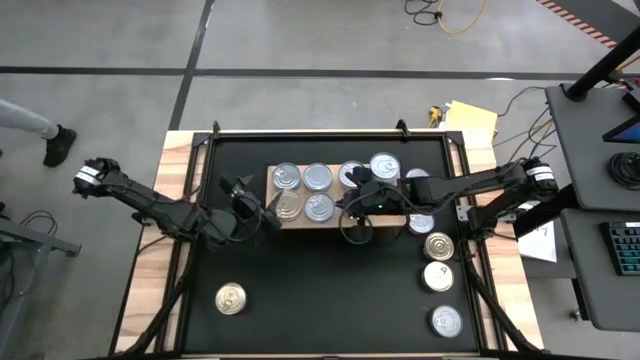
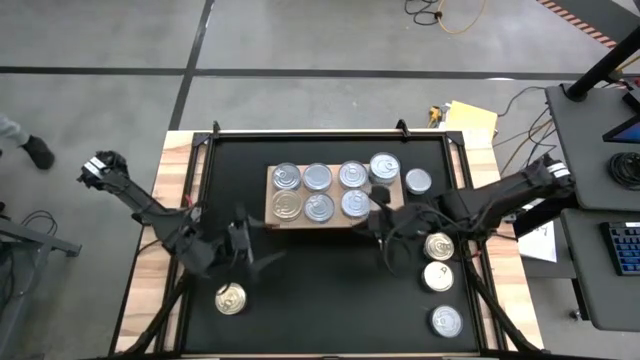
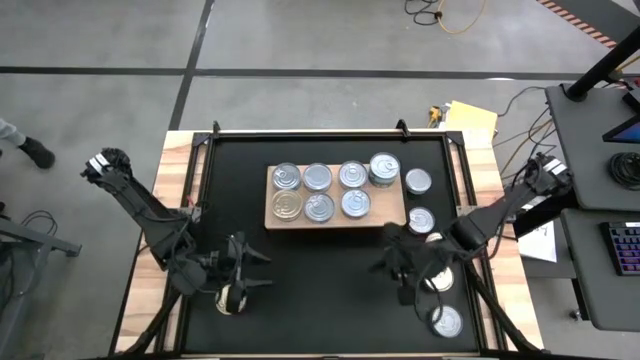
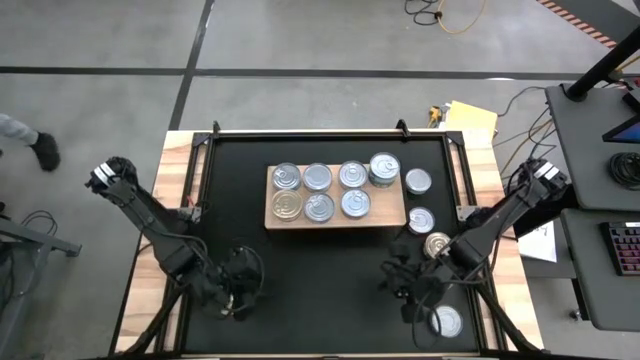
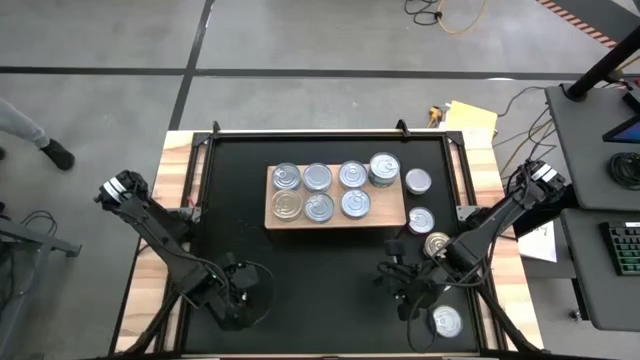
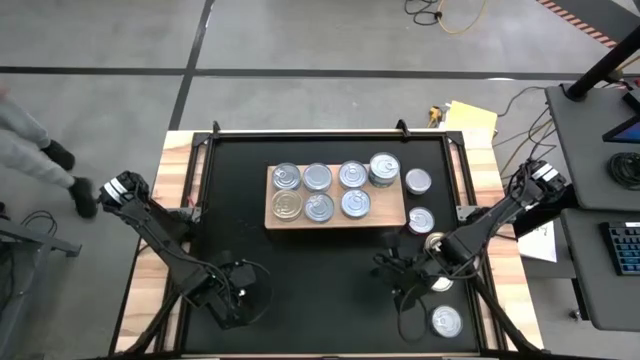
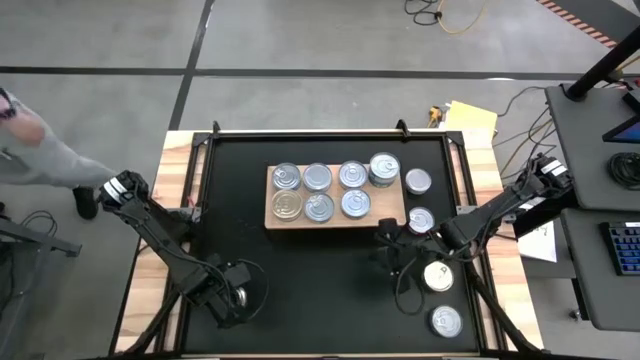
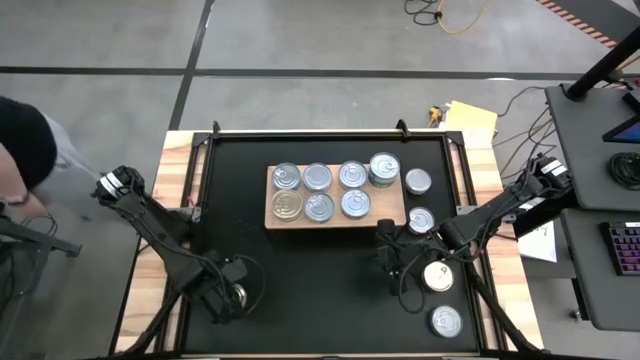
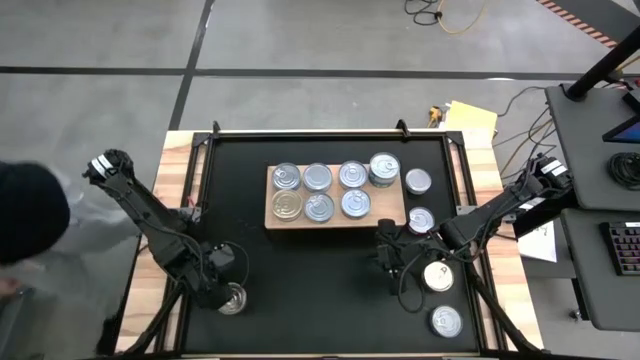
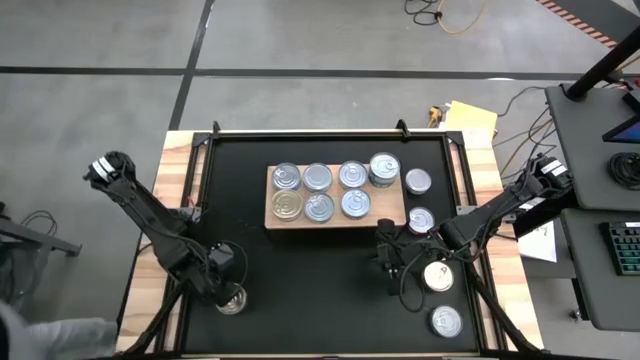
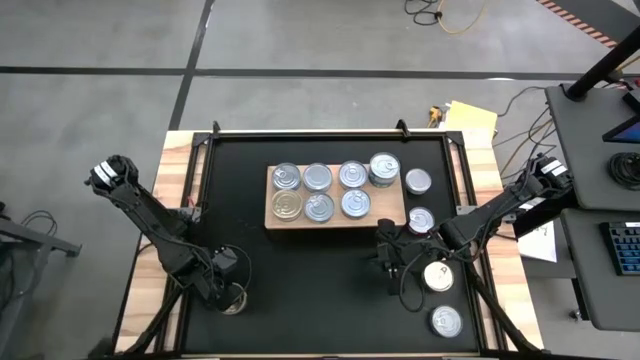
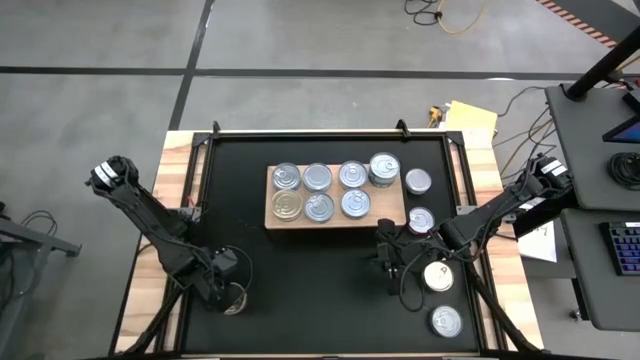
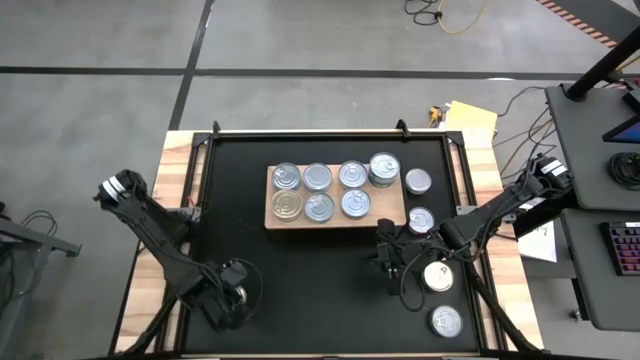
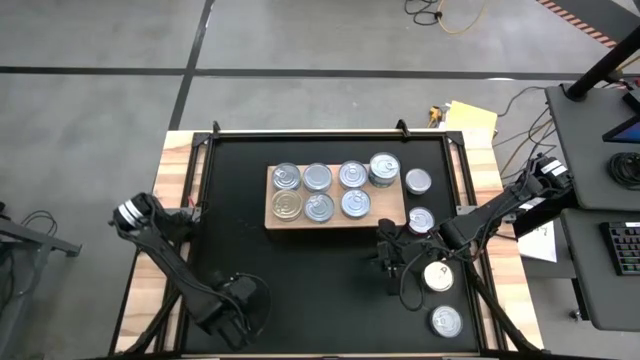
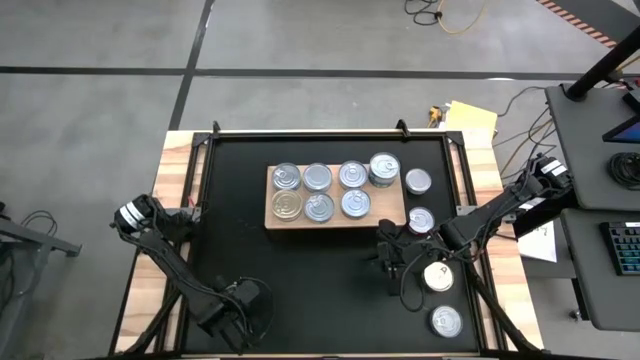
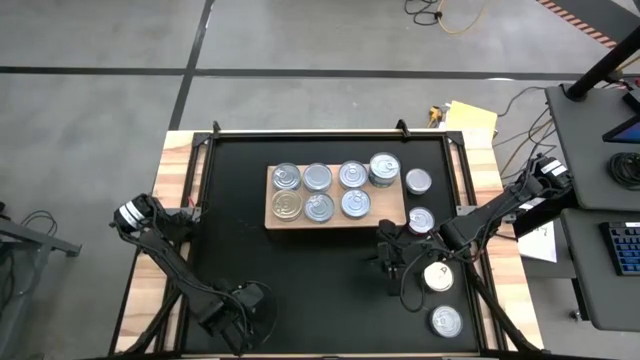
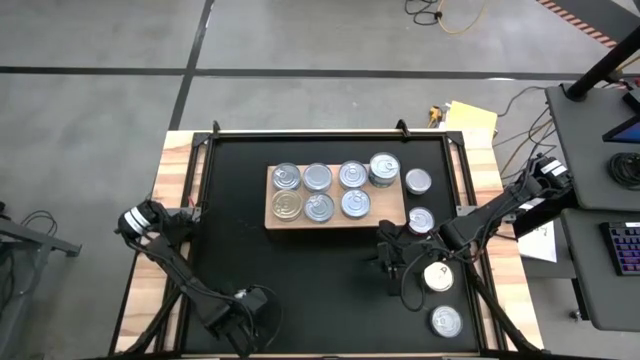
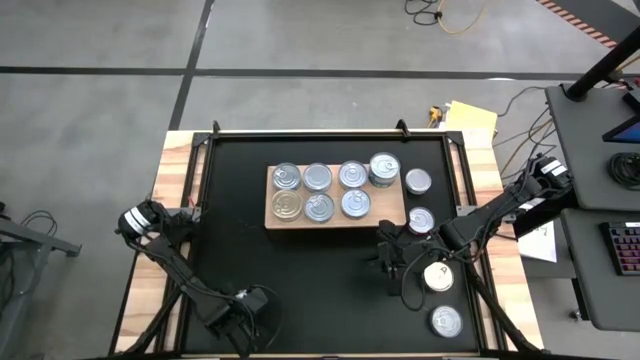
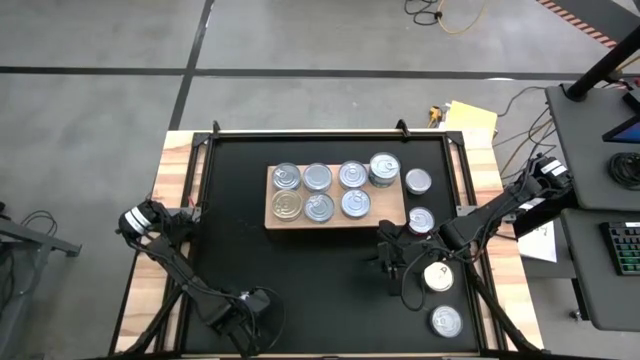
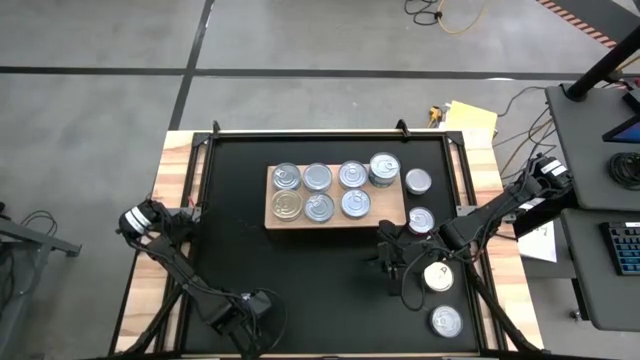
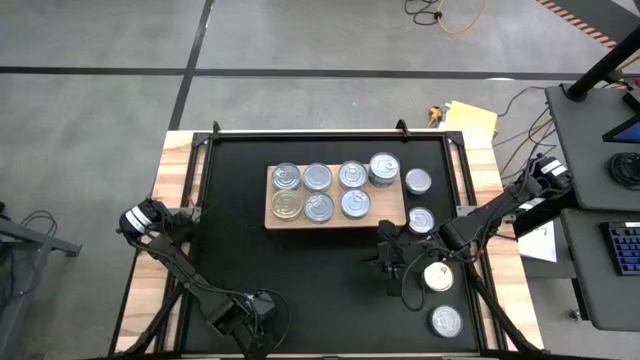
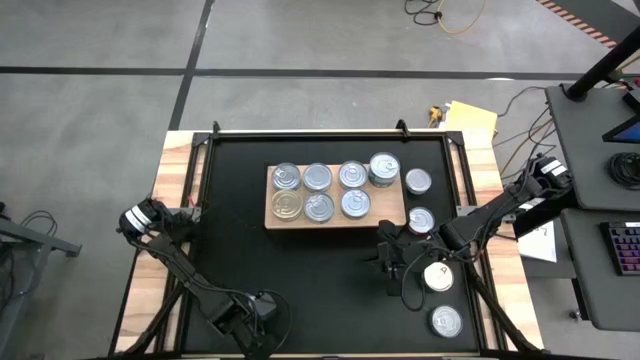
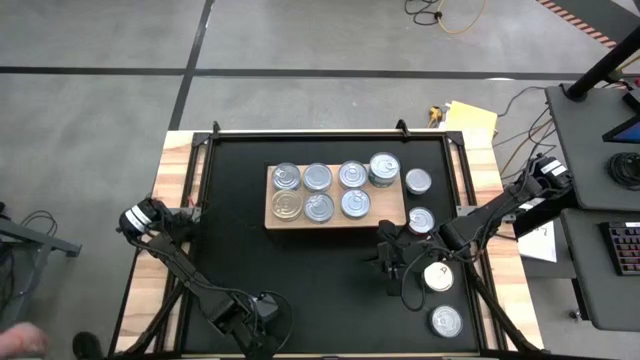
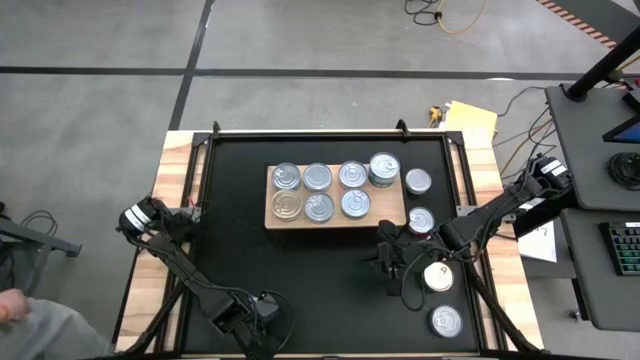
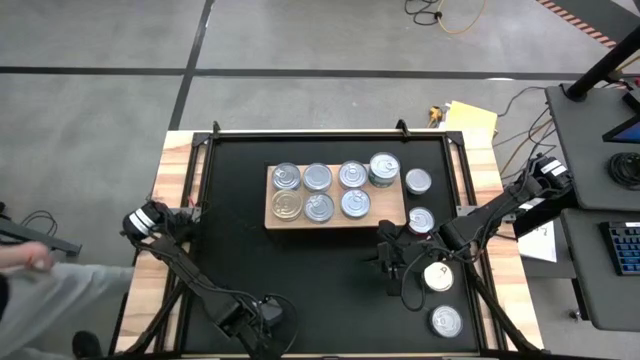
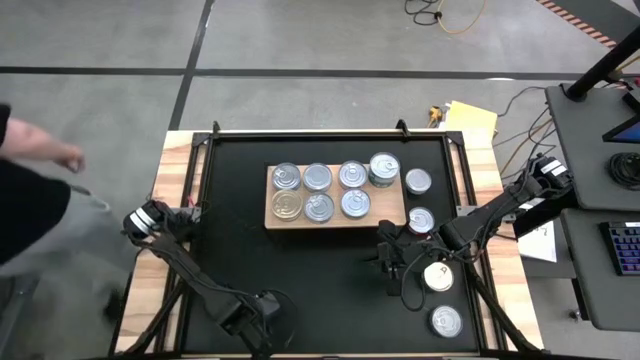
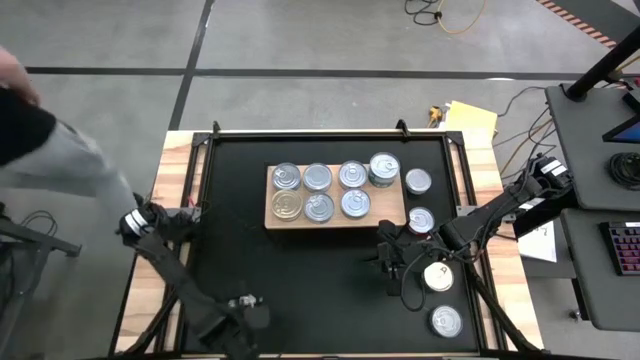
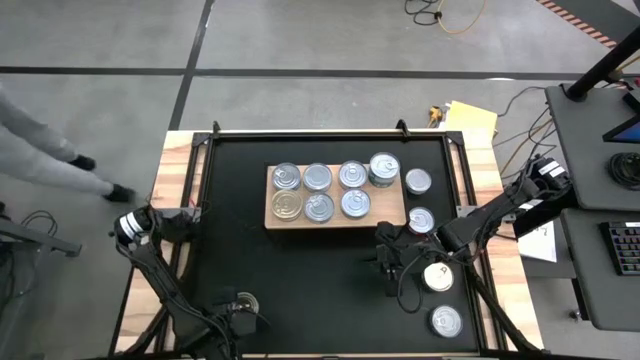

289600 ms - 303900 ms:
Task: Stack canned seafood by type on shelf
Stack the blue tuna can on the blue tuna can

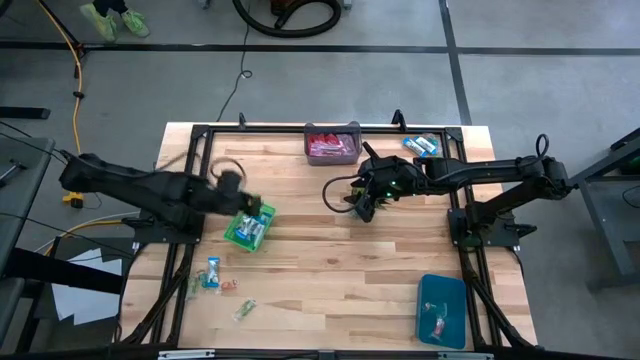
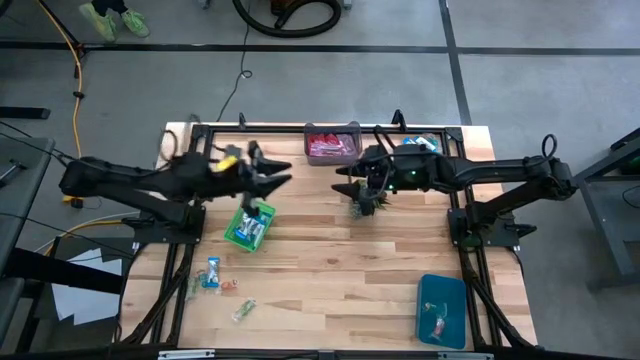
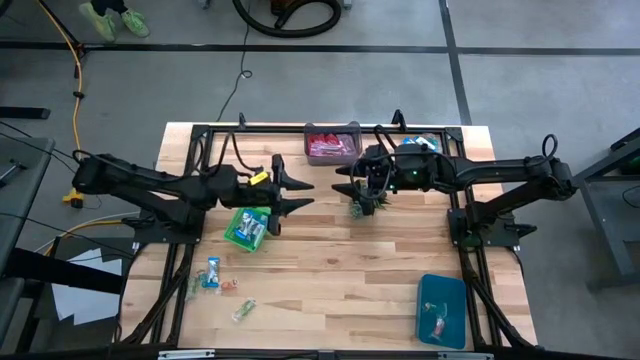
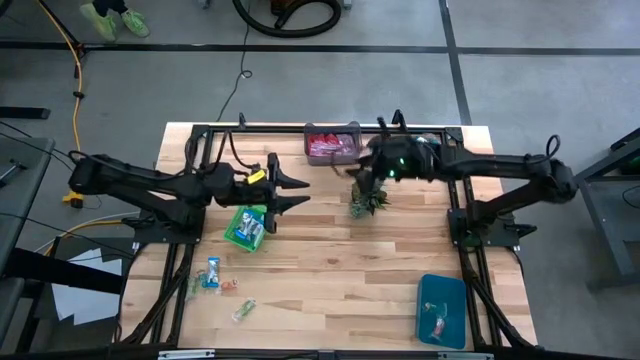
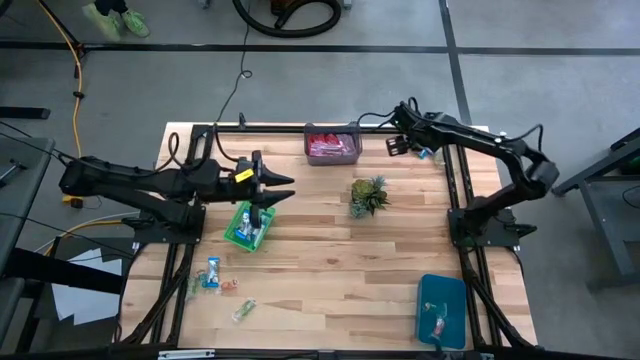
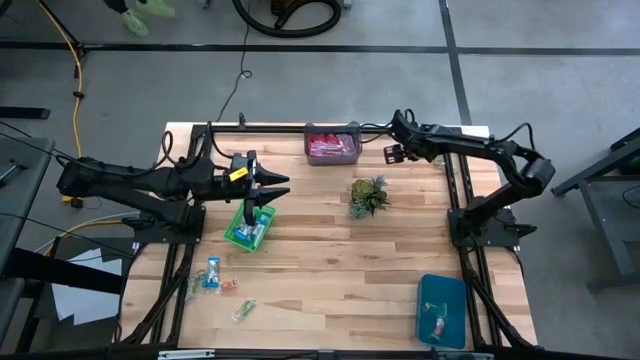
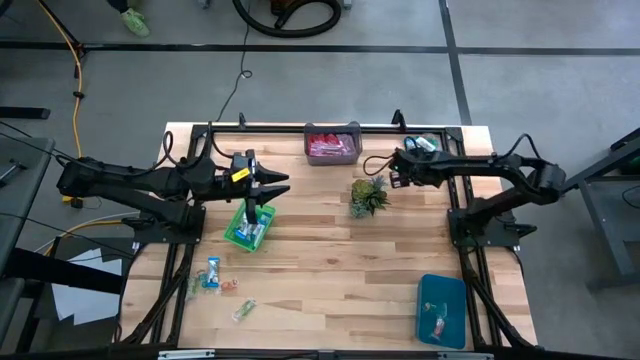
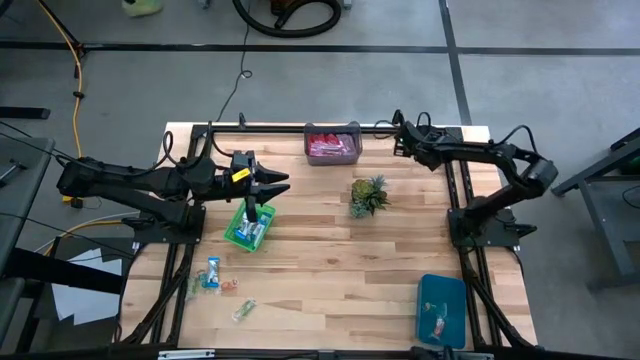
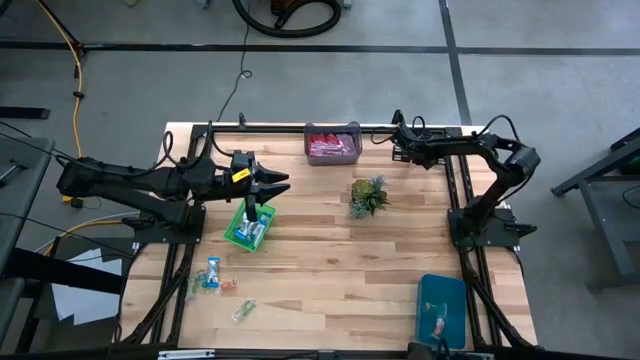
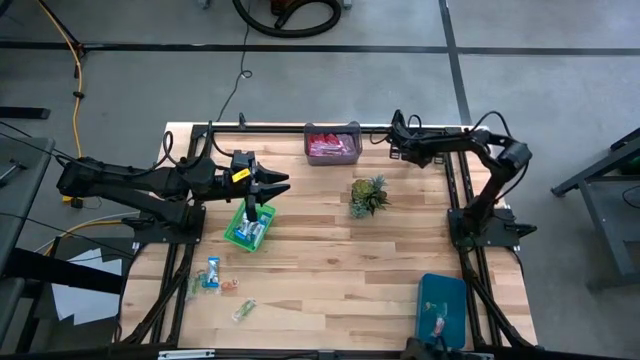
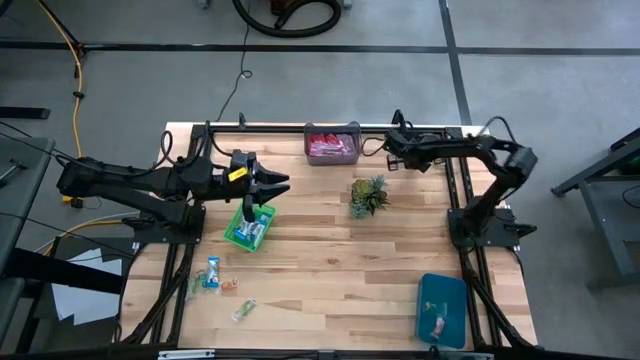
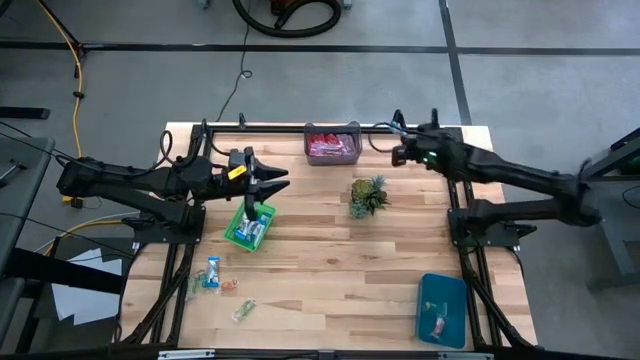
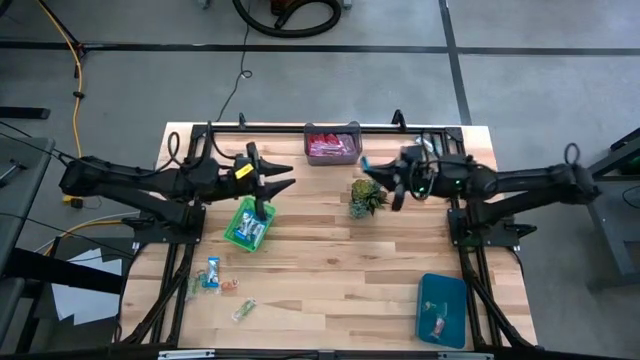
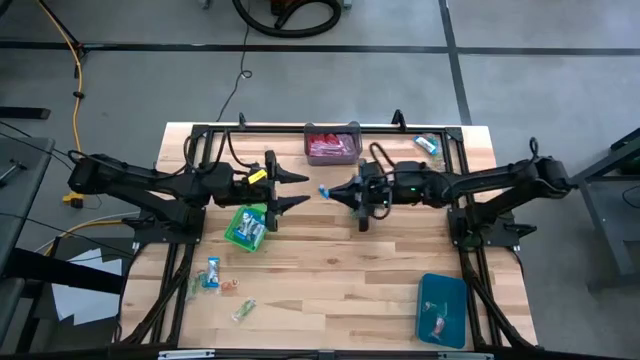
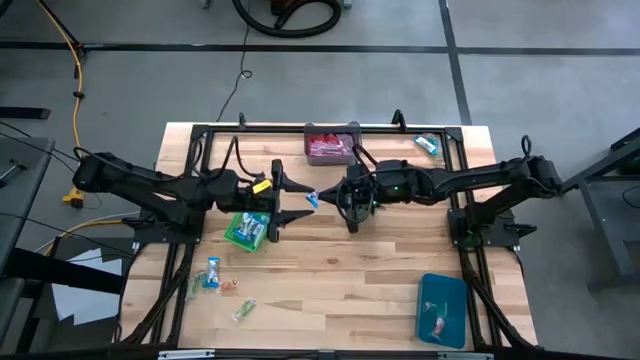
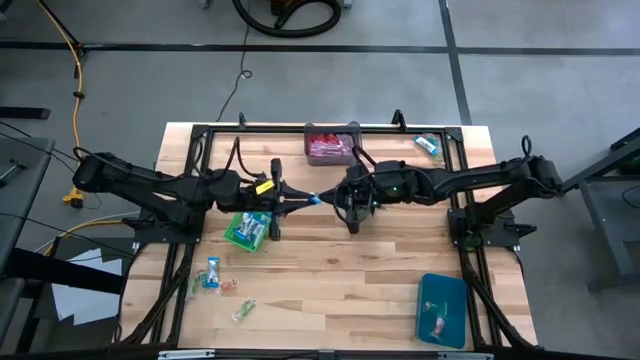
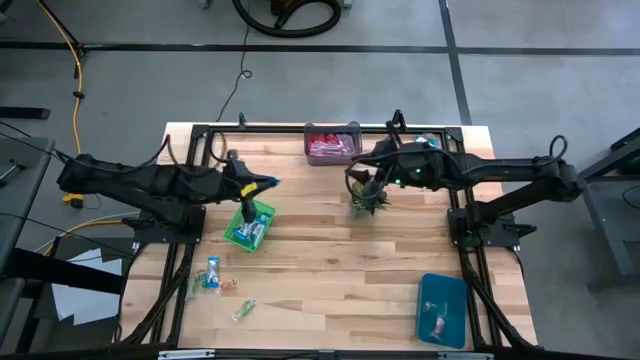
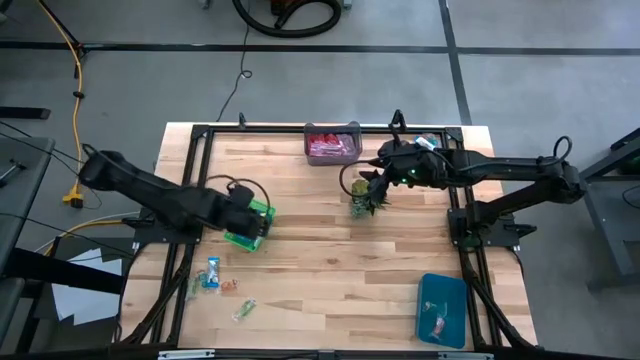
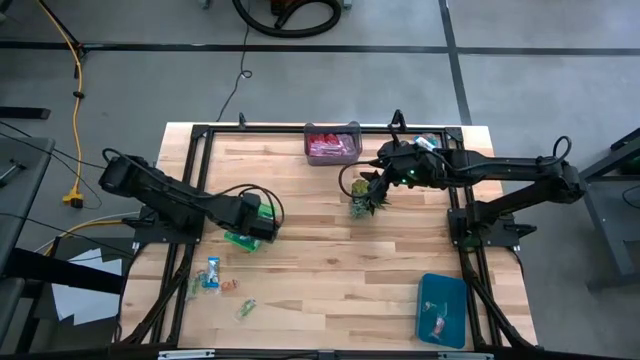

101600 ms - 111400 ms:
Task: Sort candy
Put the white candy into the green bin
